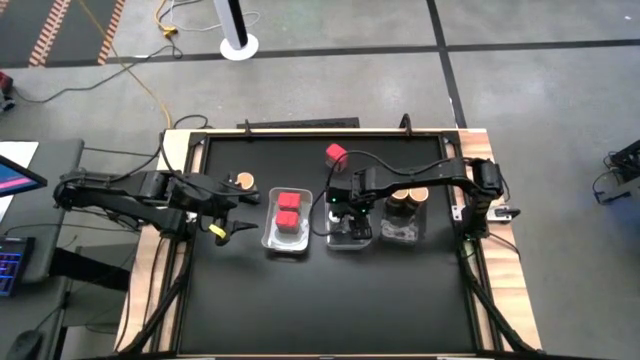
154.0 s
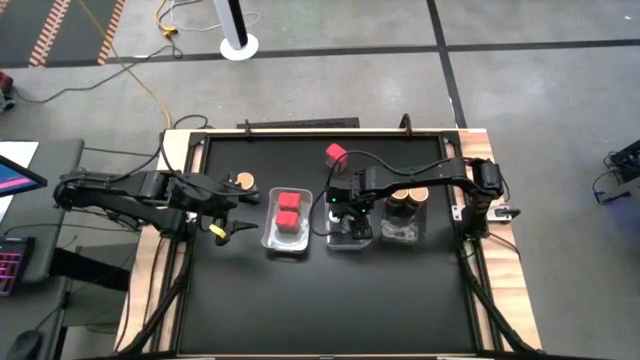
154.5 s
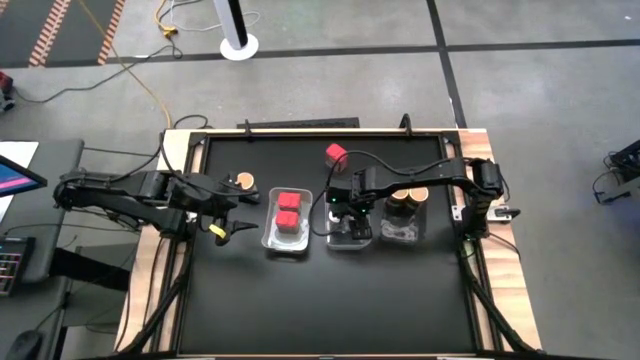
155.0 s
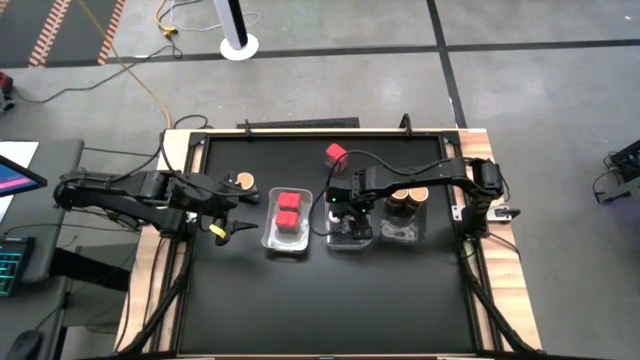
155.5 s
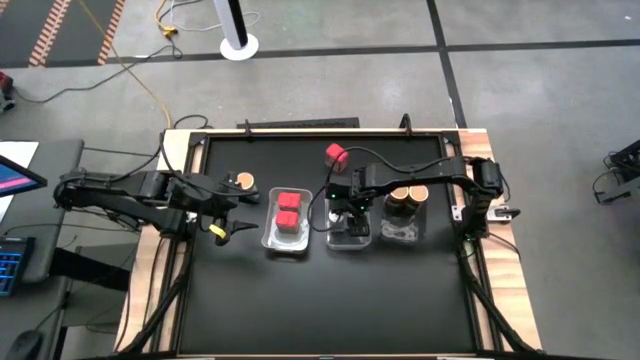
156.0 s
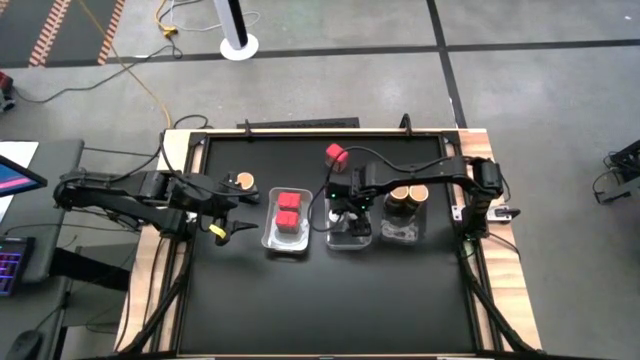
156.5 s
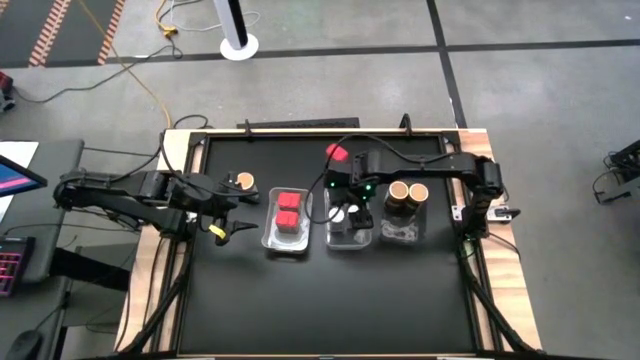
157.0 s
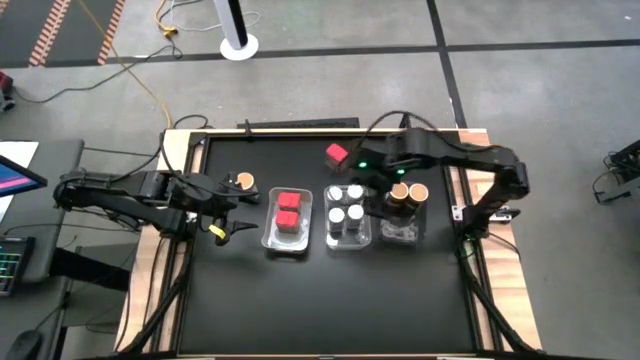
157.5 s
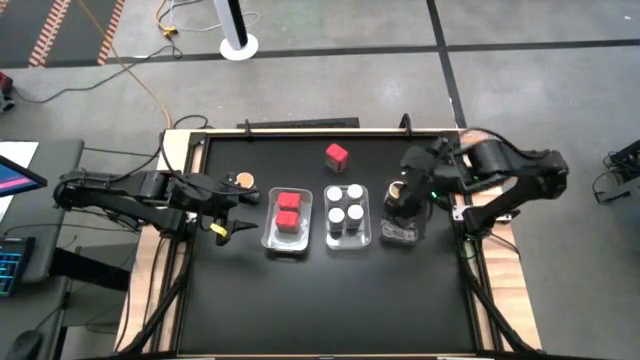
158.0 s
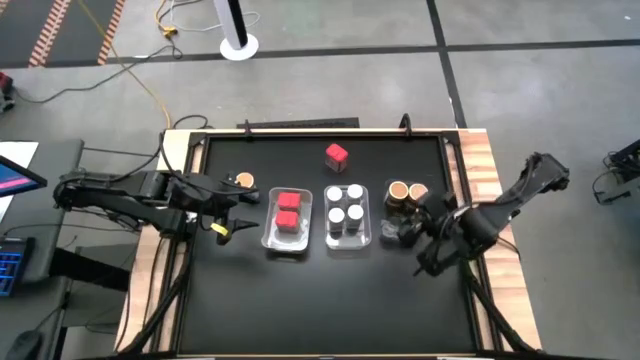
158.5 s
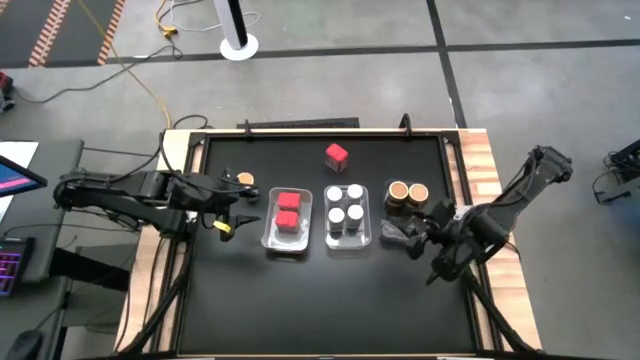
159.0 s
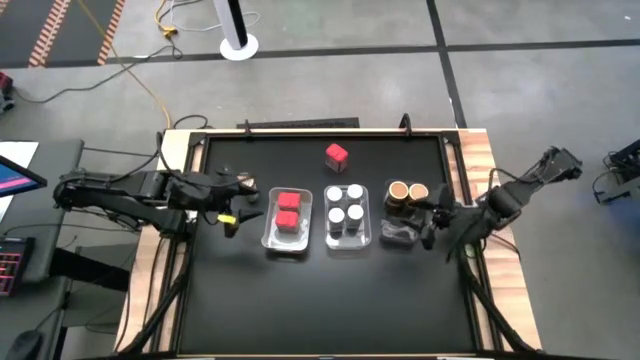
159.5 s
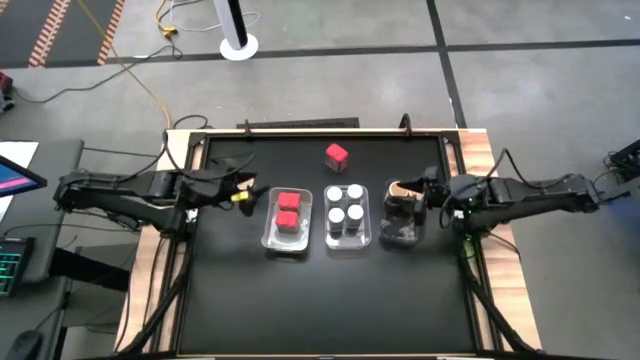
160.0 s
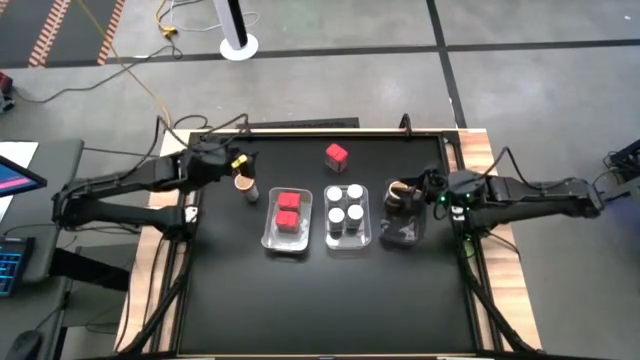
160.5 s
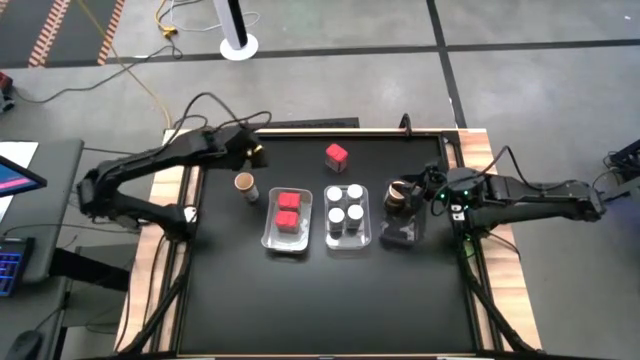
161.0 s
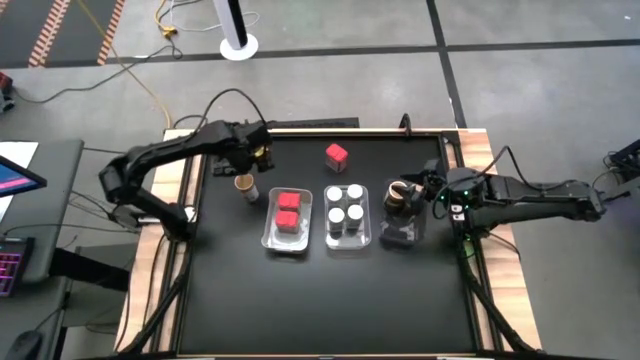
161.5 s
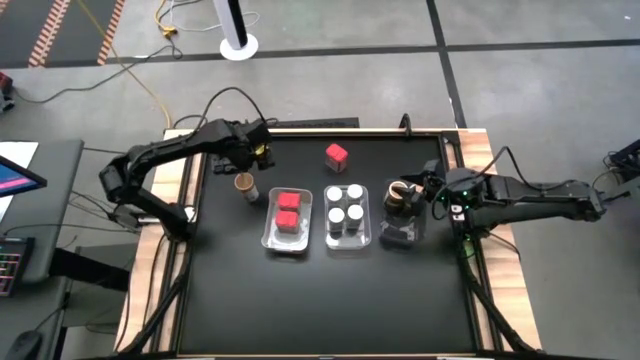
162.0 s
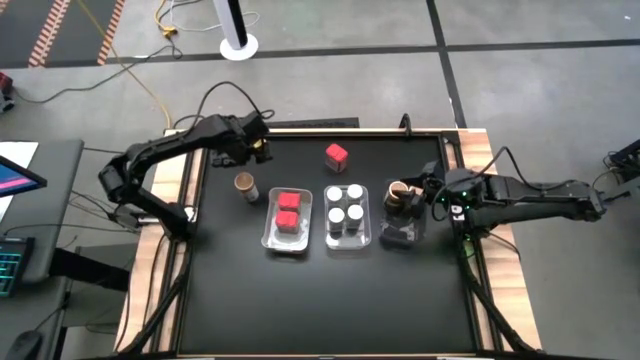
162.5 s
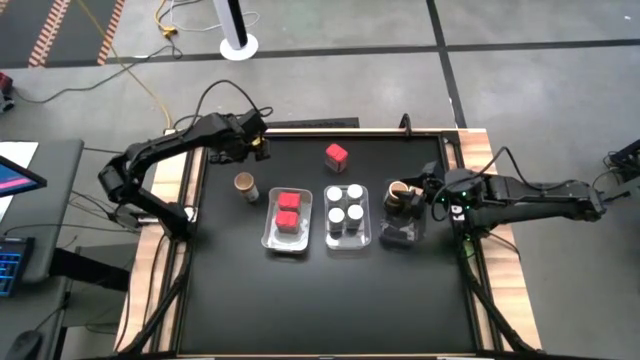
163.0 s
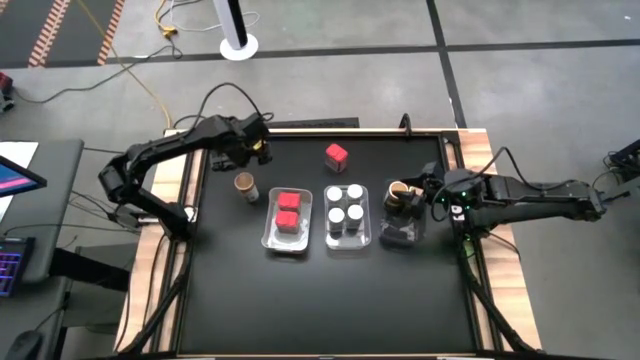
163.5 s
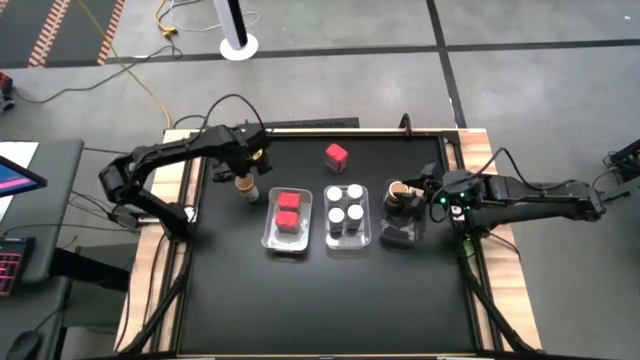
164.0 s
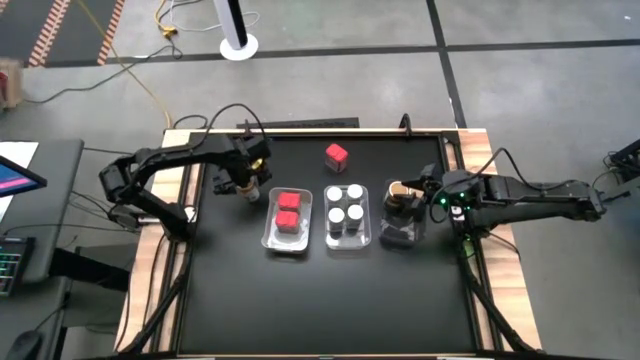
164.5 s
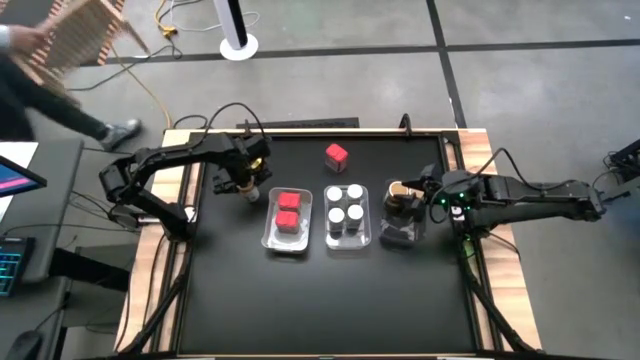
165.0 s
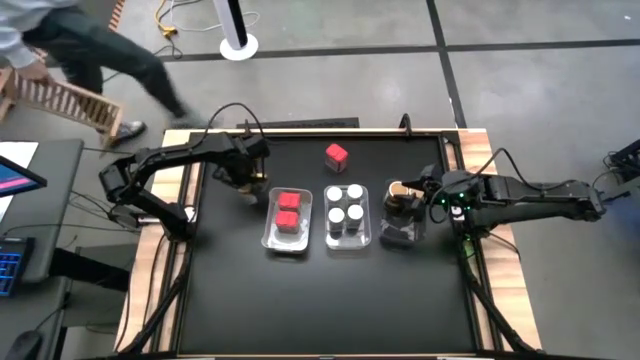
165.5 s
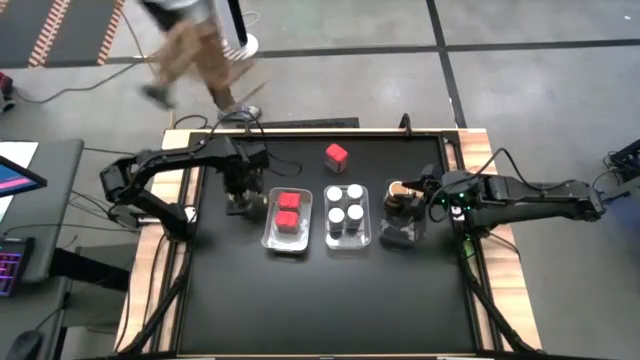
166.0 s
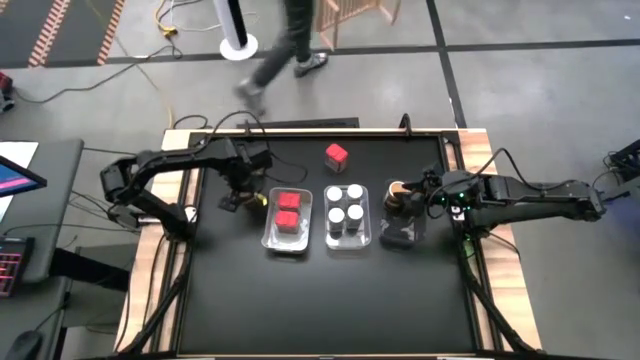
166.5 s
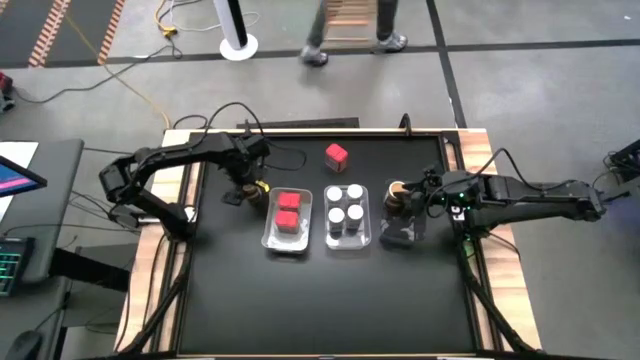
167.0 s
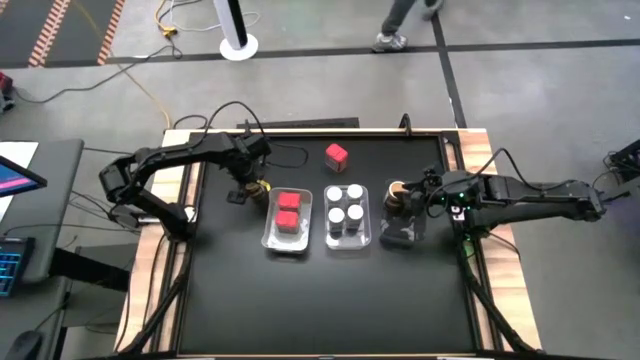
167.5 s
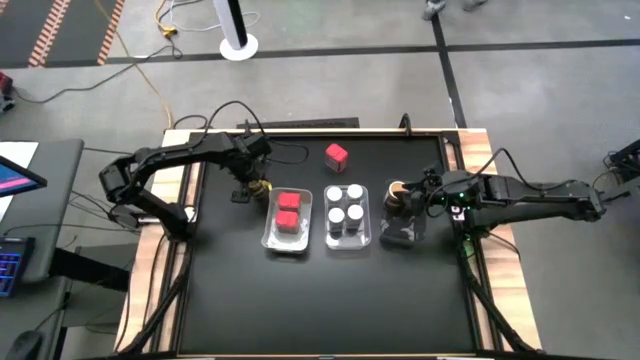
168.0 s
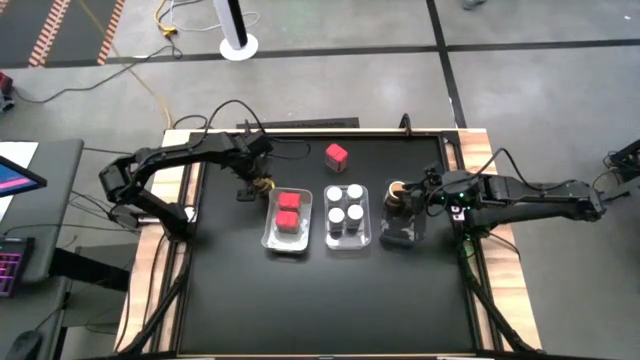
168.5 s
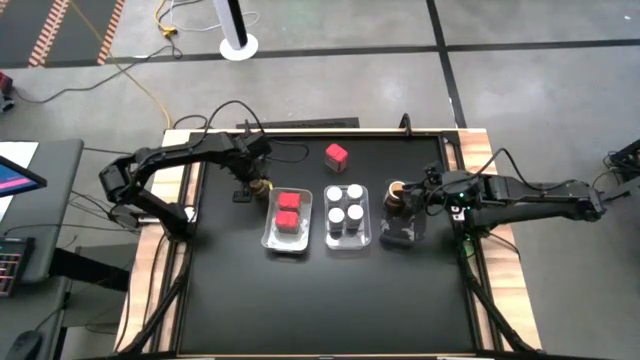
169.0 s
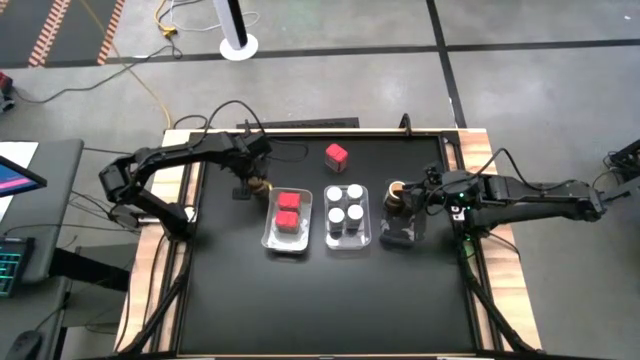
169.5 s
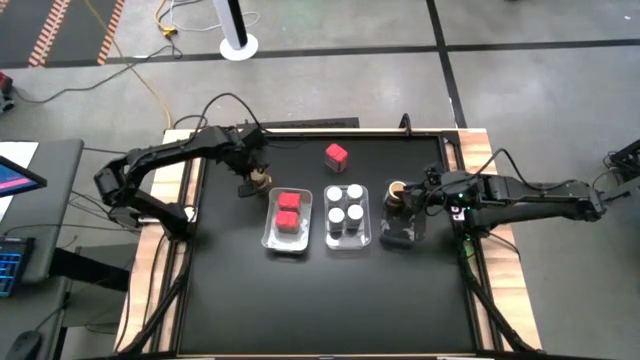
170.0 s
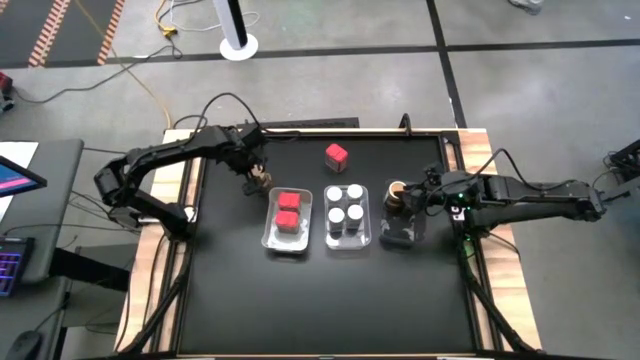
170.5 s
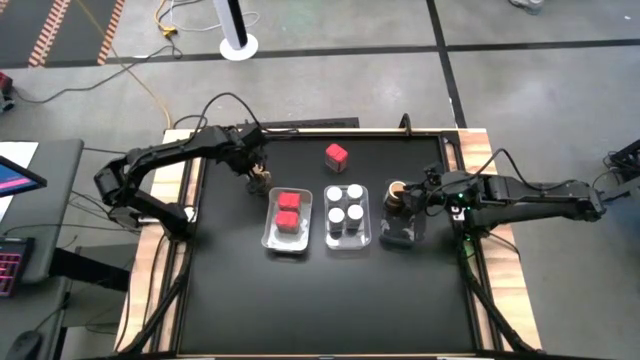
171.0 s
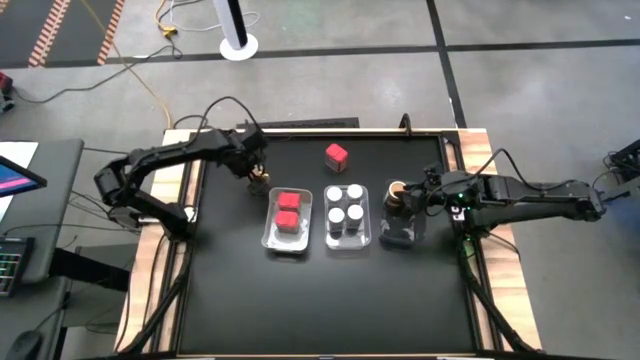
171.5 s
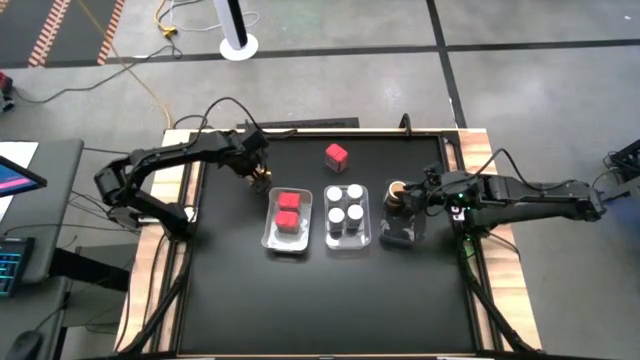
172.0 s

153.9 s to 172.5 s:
Task: Sort spices by type
Put the brown seasoning bottle into the black bin

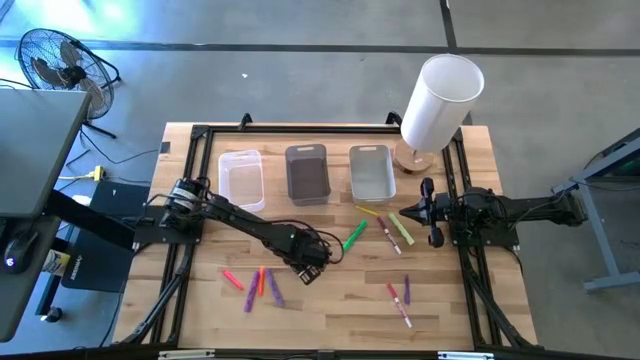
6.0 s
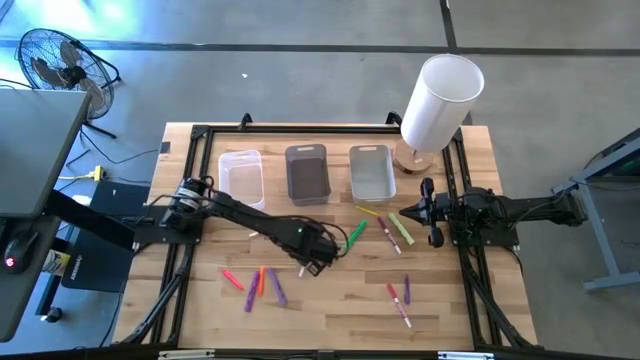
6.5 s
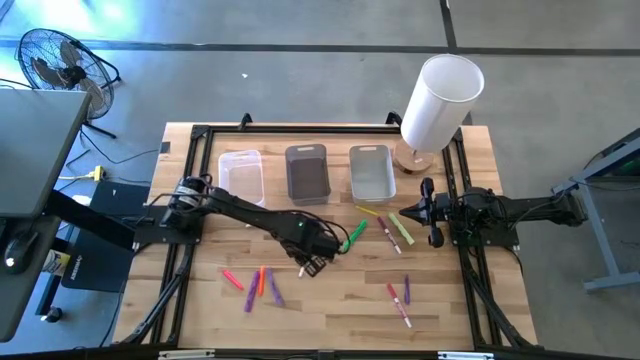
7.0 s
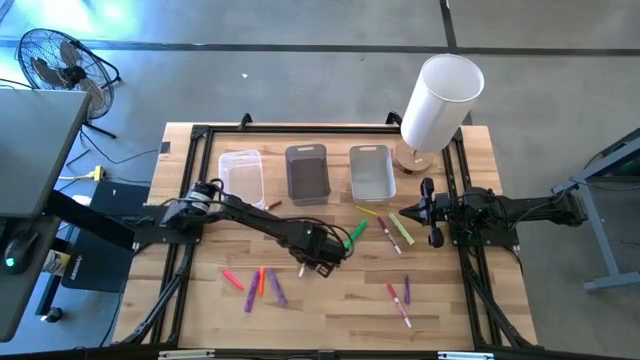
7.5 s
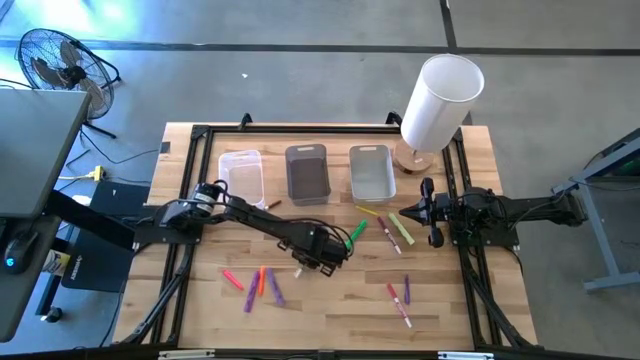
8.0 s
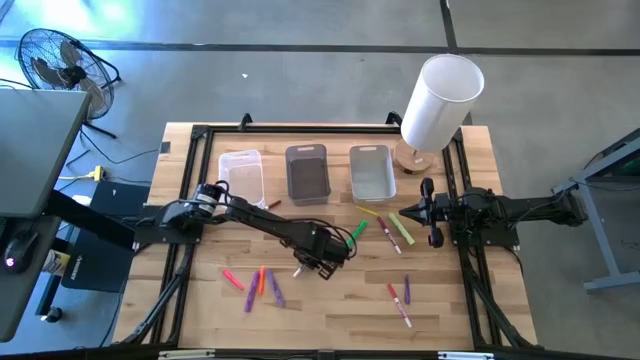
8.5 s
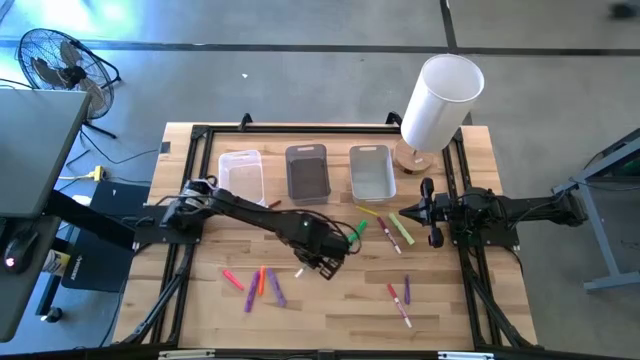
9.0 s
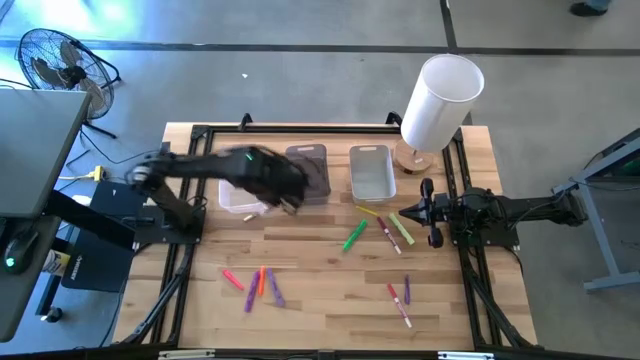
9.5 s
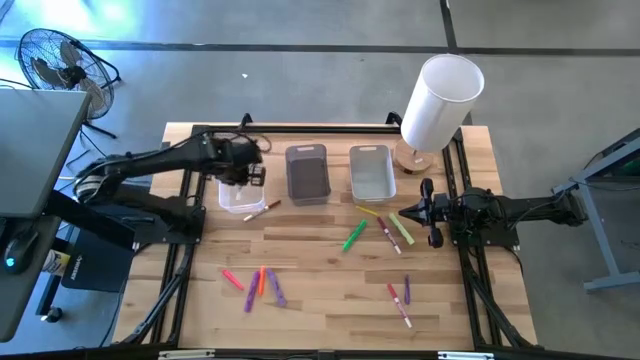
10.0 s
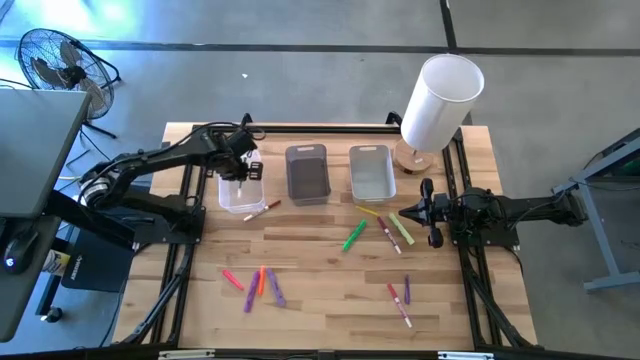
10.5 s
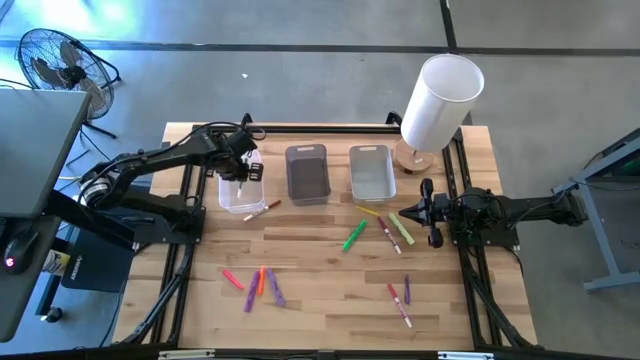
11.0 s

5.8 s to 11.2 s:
Task: Pick & Place Markers
Put the green marker pen into the transparent bin
